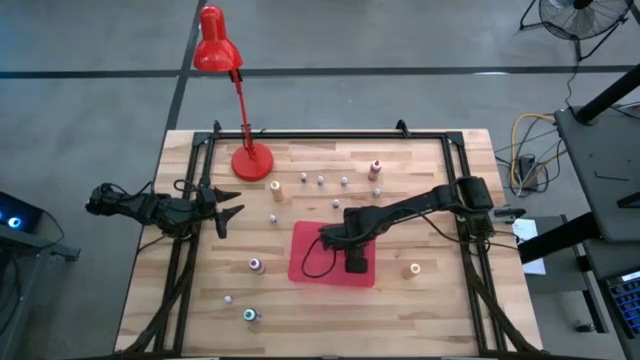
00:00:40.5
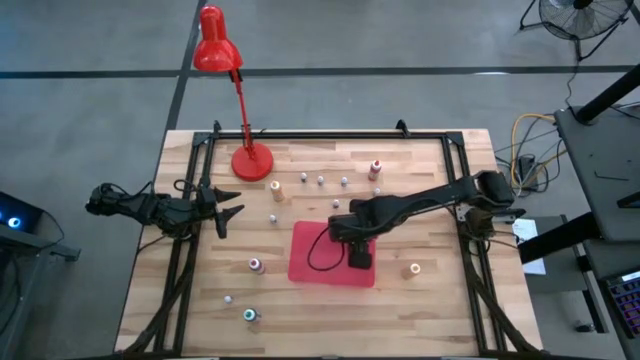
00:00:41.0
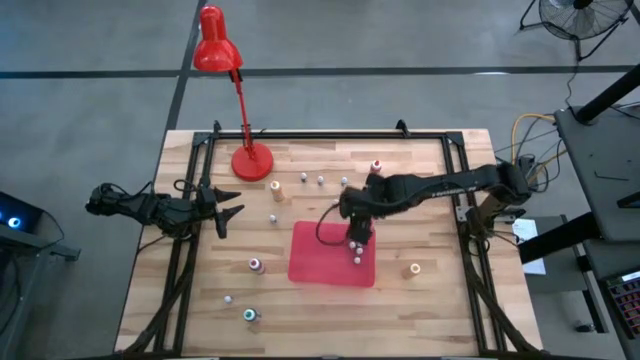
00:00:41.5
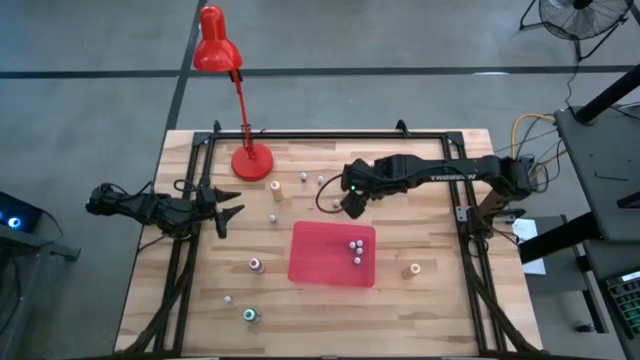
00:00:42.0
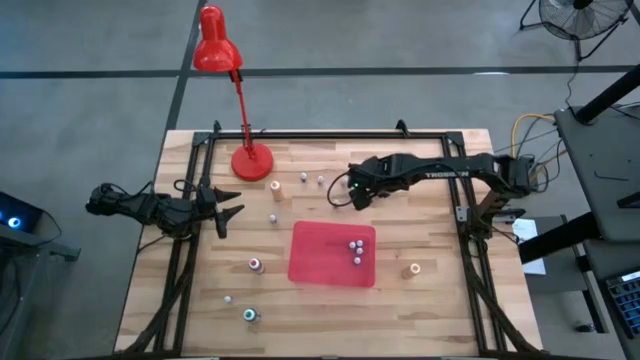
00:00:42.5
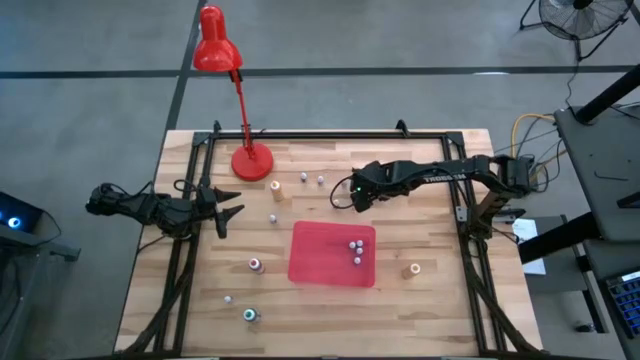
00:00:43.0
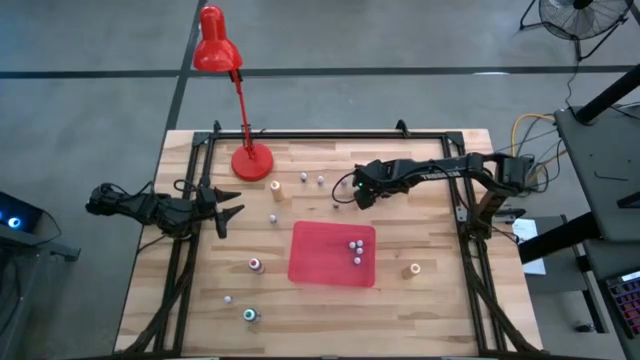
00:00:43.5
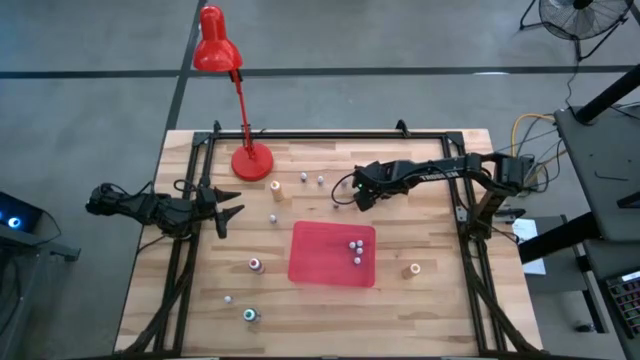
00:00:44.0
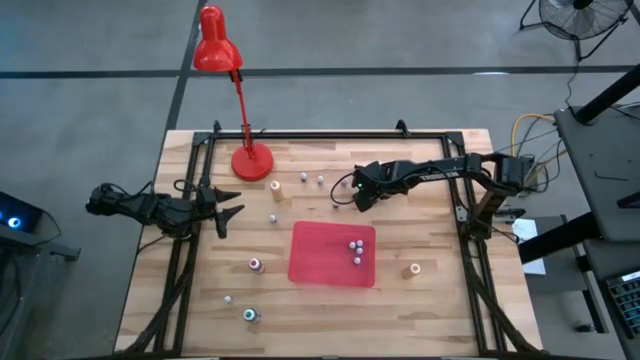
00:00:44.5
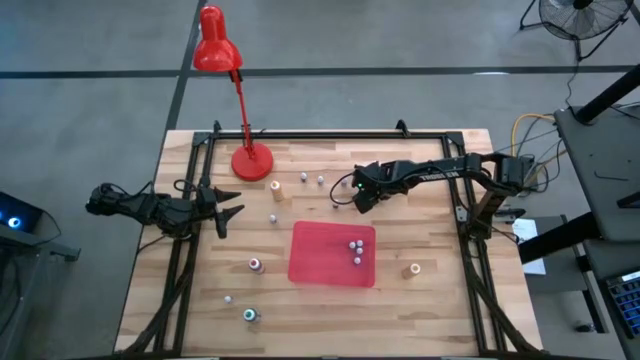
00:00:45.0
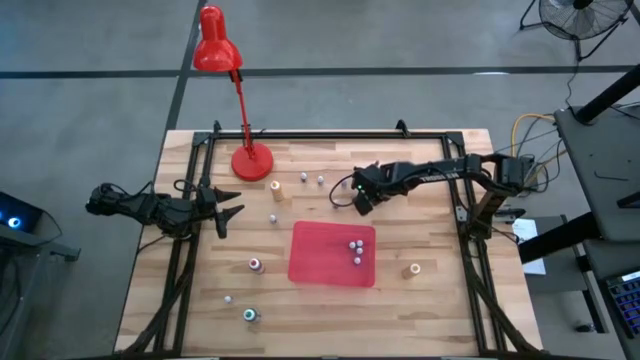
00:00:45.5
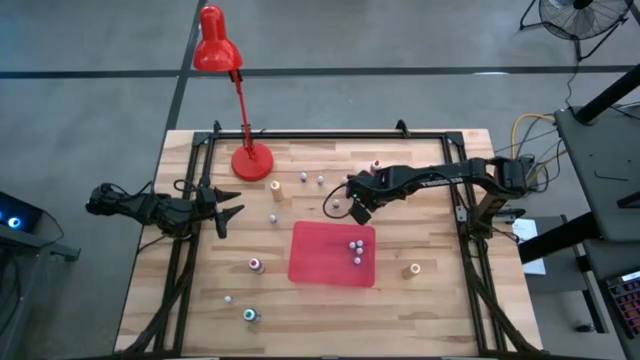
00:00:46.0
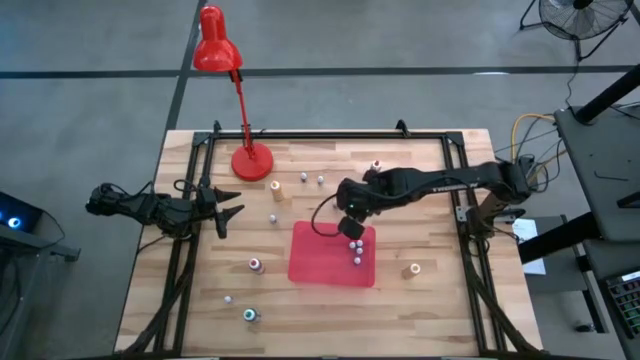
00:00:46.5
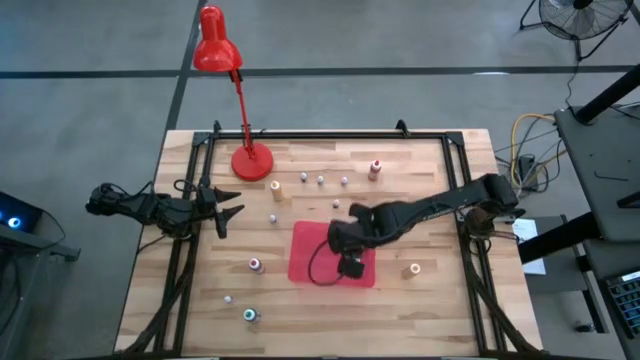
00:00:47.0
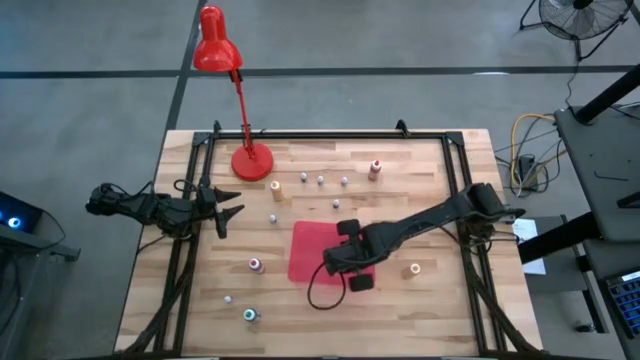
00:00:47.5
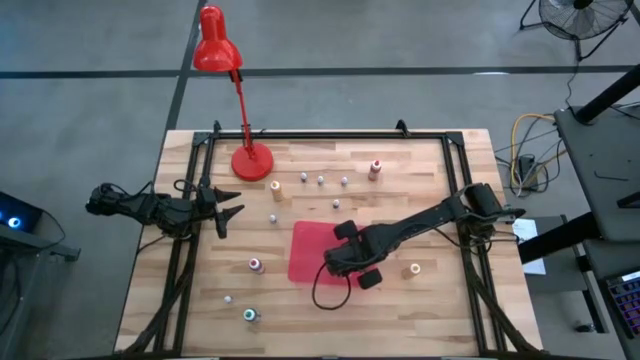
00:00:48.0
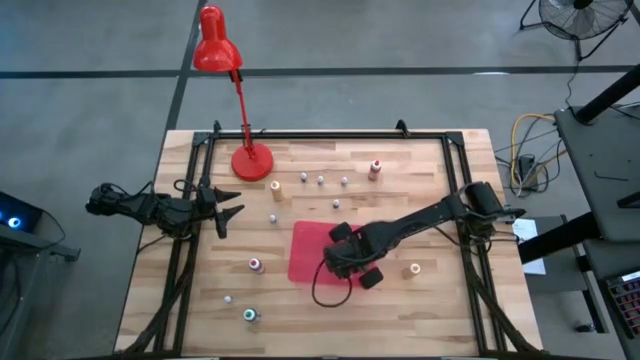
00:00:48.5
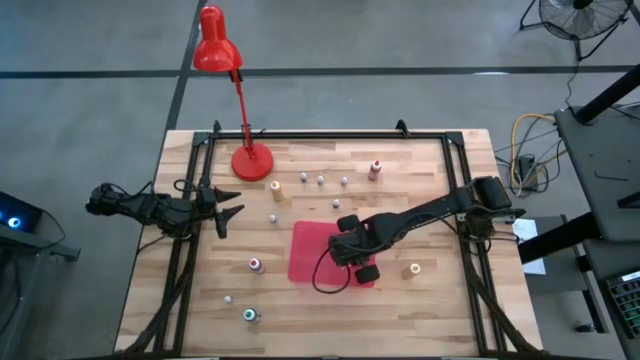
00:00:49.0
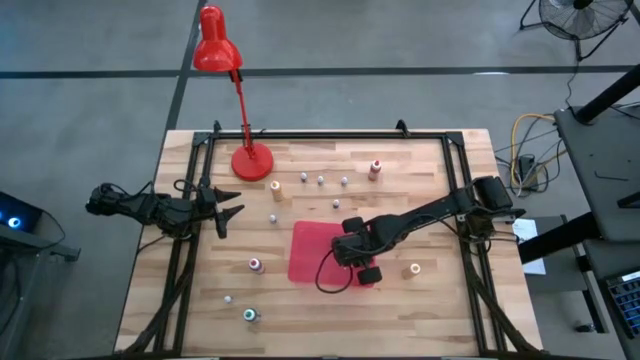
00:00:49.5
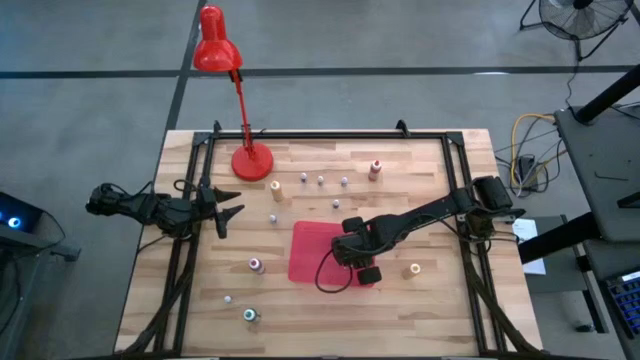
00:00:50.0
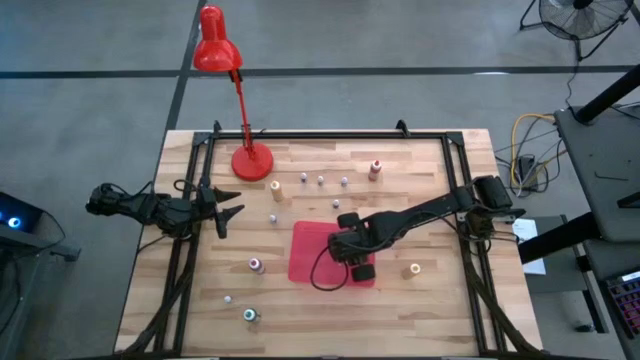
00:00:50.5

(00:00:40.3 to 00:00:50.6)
Task: Pick & Place food coloring
Put the small green food coloring bottle in the red bin

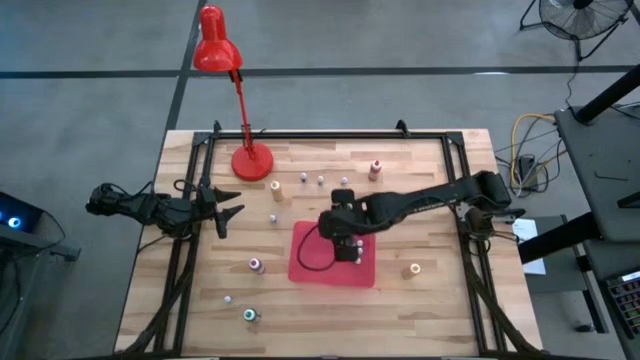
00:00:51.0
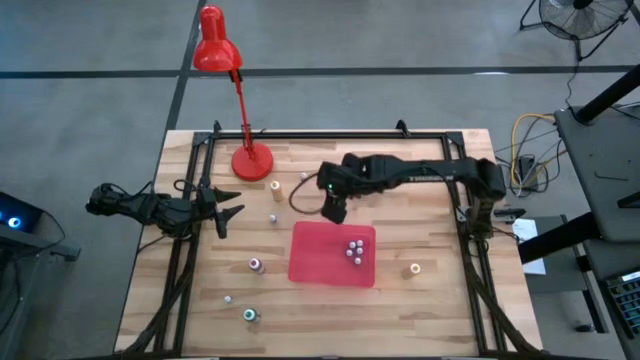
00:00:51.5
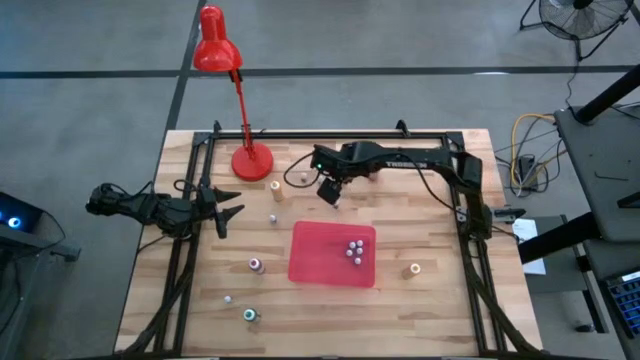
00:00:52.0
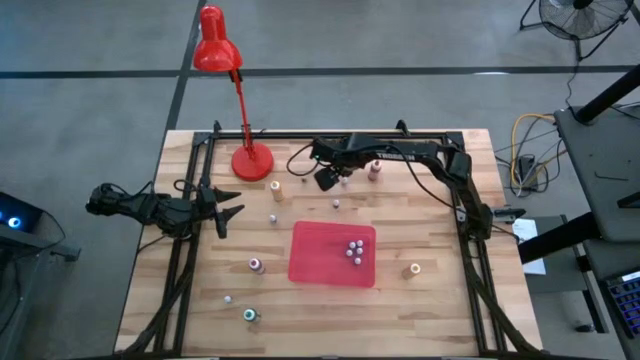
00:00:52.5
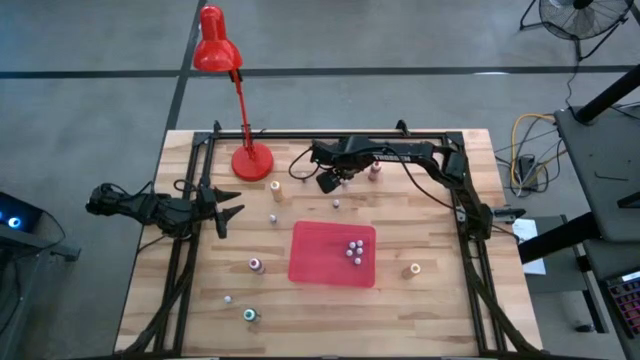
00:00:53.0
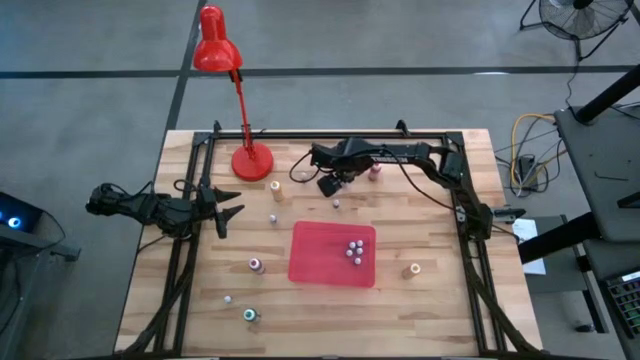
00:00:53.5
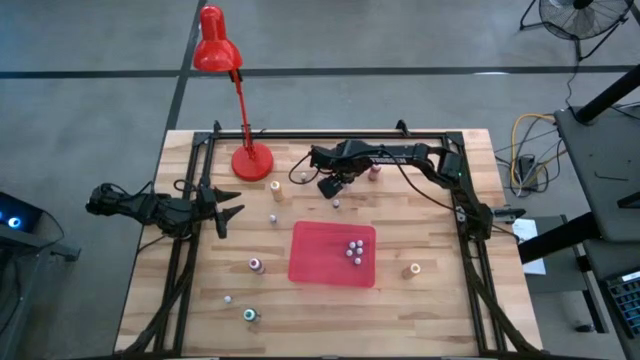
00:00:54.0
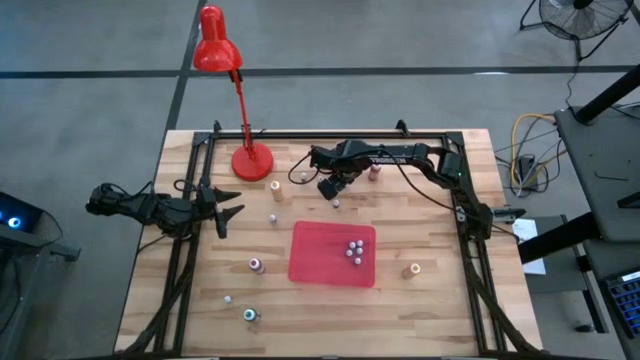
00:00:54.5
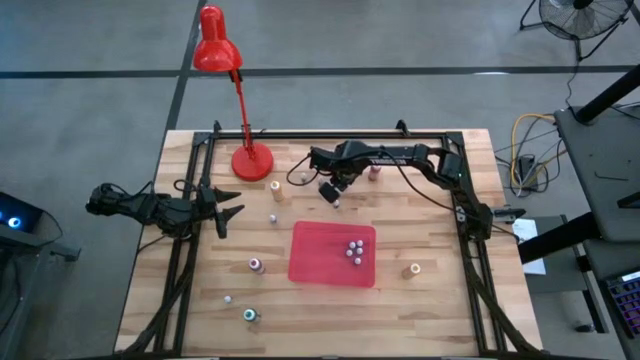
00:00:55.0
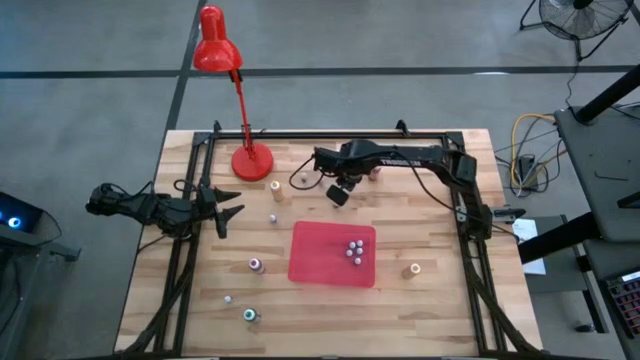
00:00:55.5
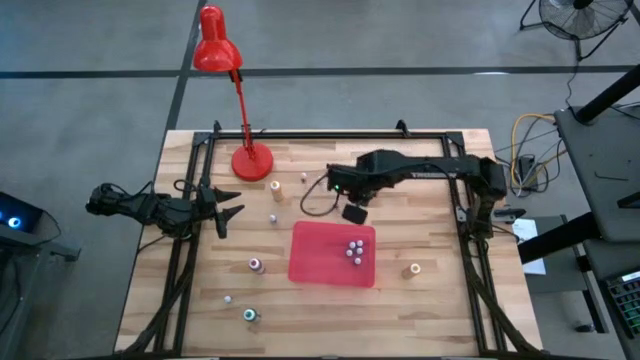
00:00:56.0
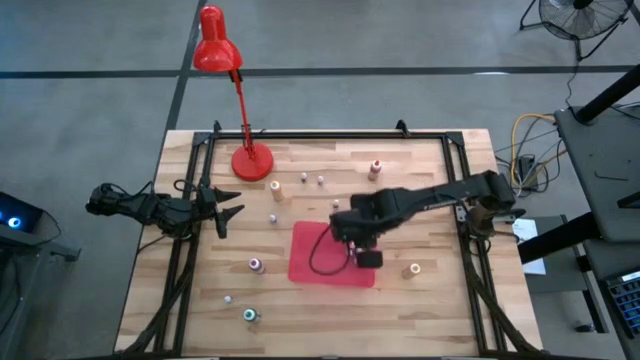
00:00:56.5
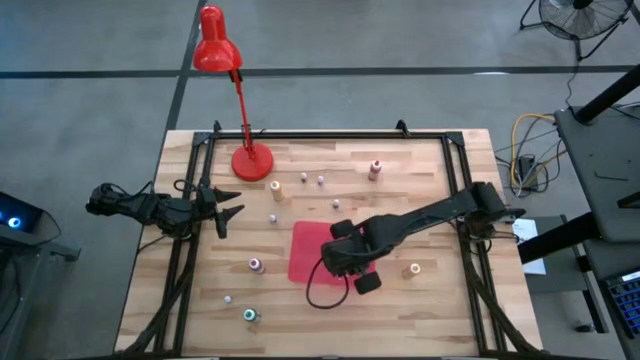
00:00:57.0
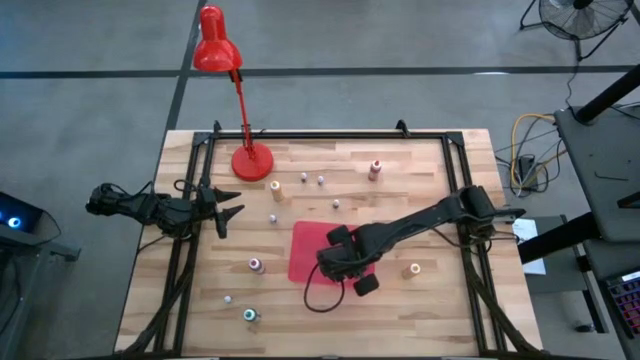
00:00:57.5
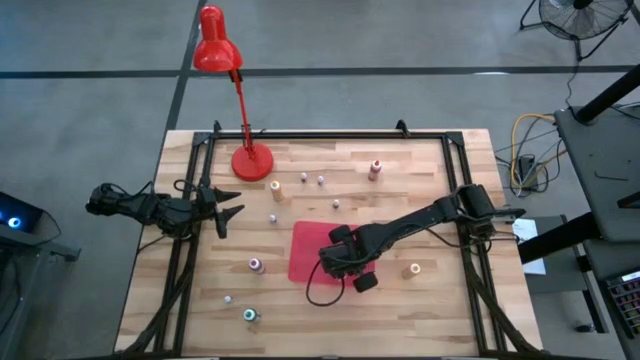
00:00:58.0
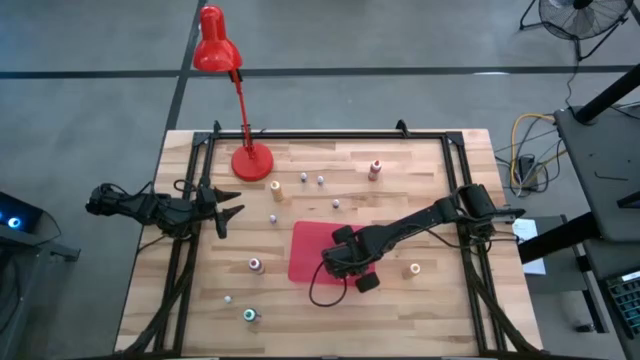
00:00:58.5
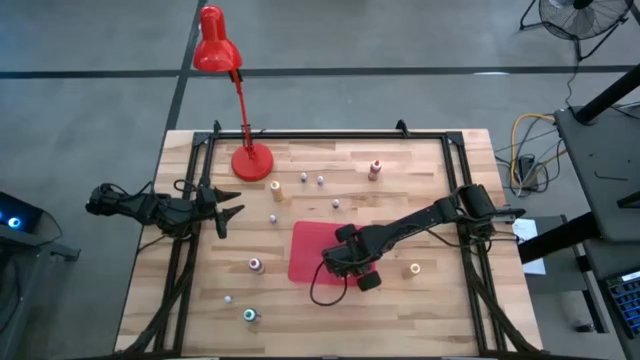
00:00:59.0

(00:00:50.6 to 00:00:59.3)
Put the small red food coloring bottle in the red bin

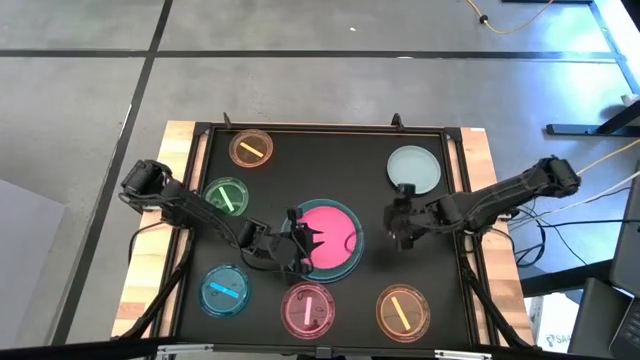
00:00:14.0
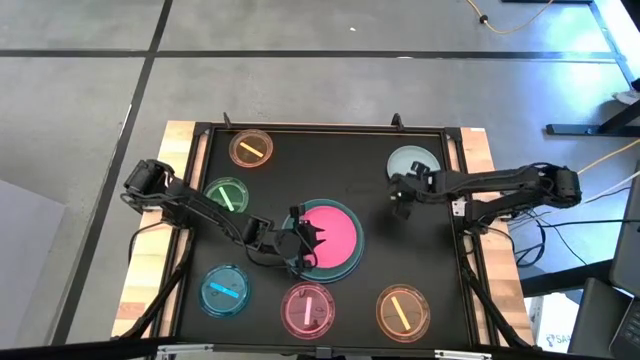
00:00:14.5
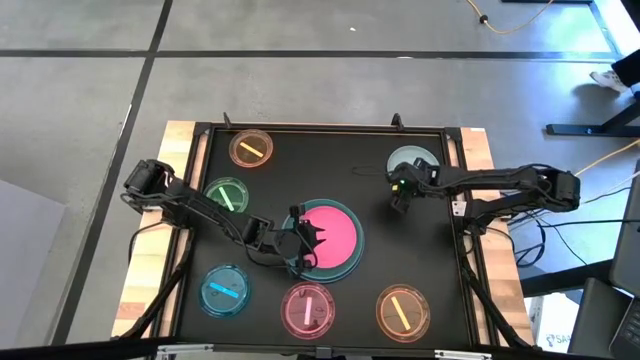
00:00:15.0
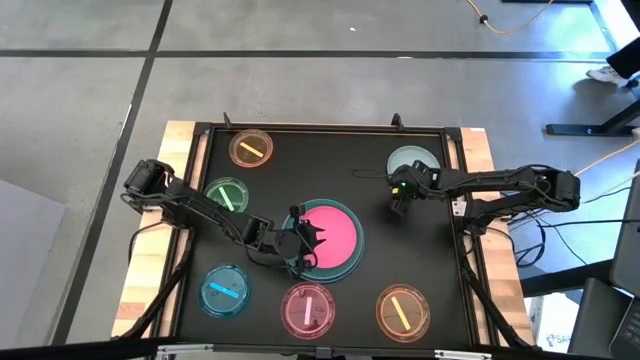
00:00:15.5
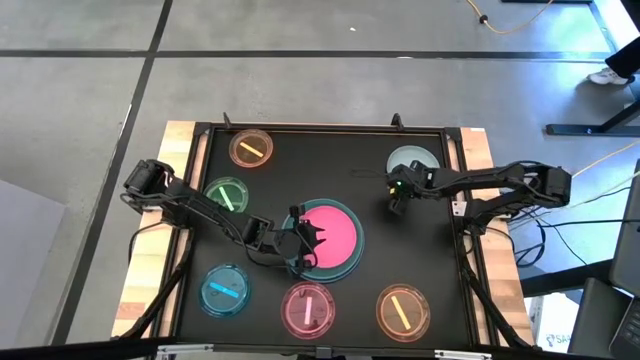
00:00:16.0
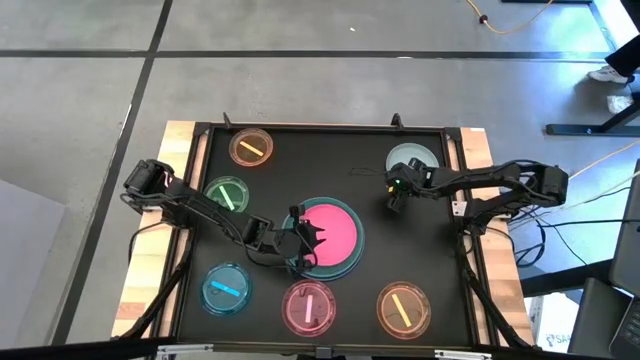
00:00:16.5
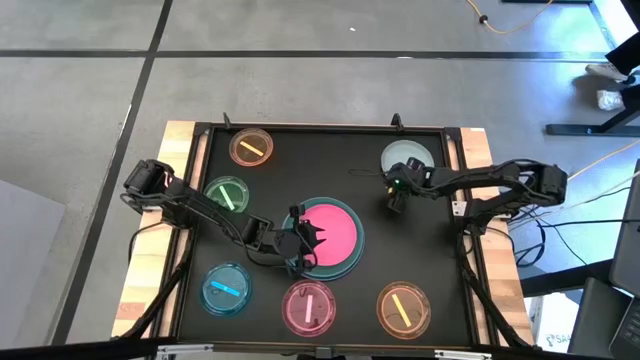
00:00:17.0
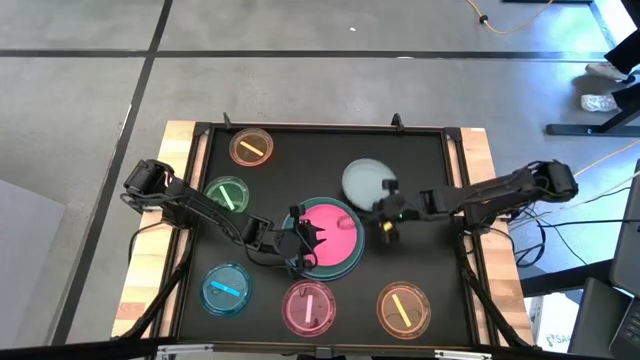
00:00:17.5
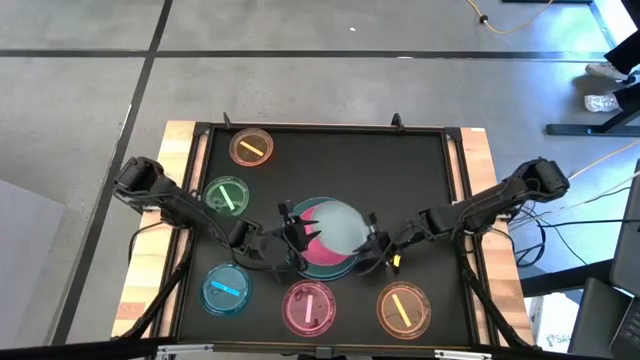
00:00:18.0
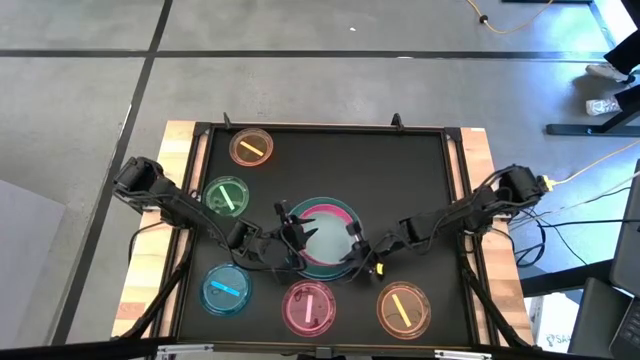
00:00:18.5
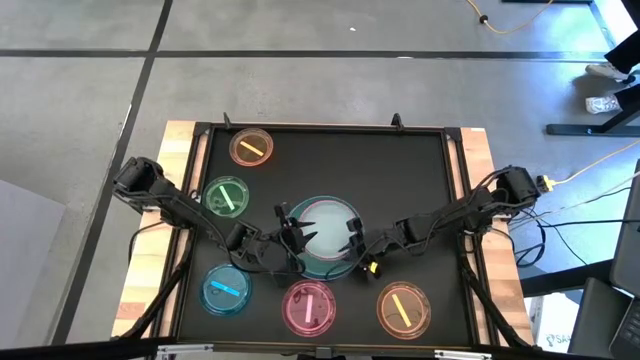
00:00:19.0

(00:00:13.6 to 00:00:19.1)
Task: Stack plastic plates
Stack the medium gray plate on the medium pink plate
